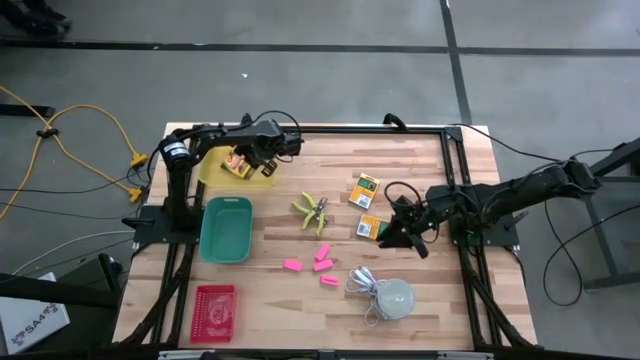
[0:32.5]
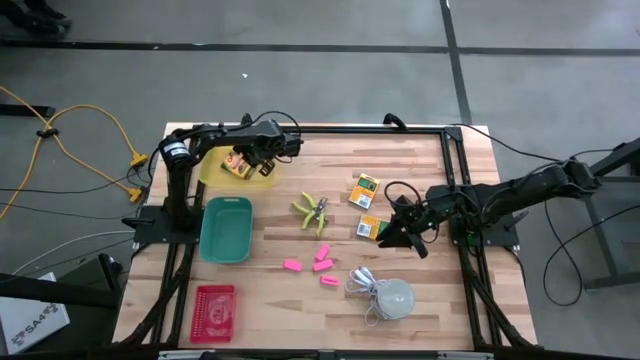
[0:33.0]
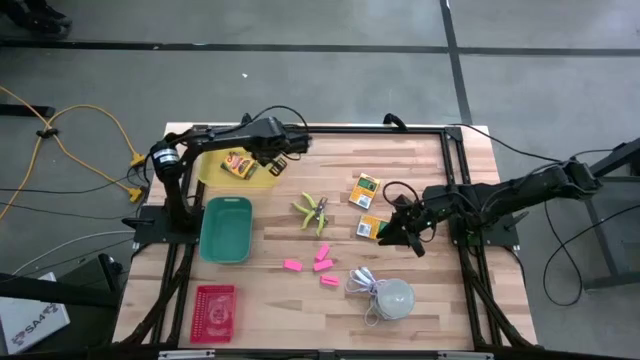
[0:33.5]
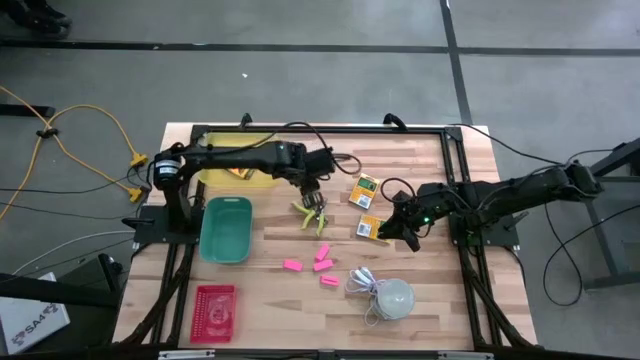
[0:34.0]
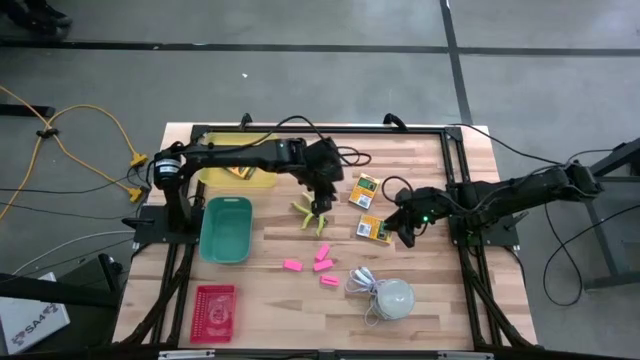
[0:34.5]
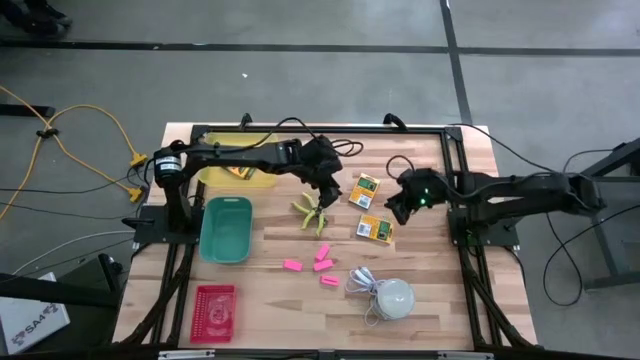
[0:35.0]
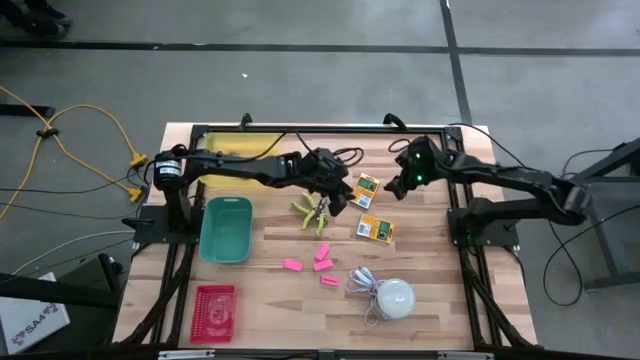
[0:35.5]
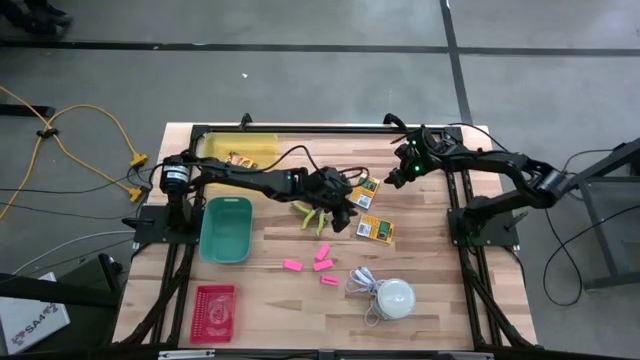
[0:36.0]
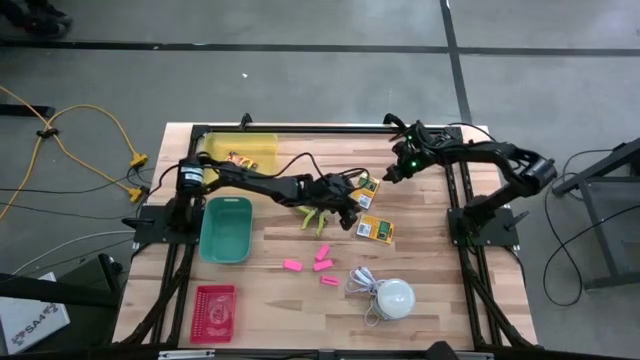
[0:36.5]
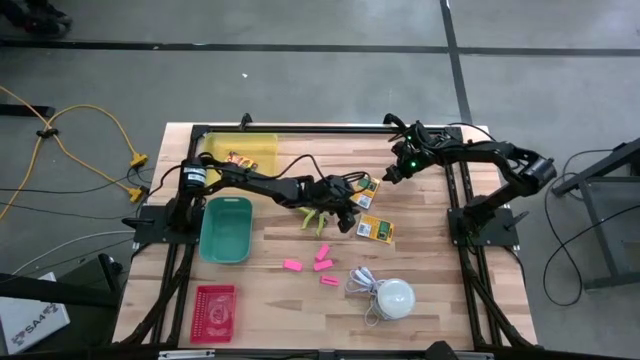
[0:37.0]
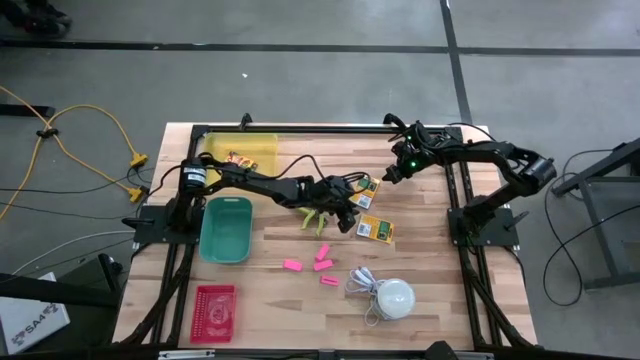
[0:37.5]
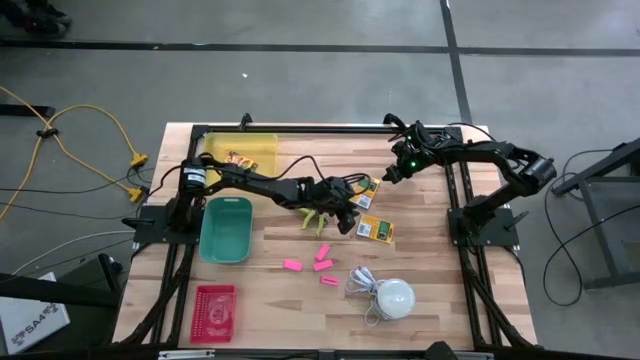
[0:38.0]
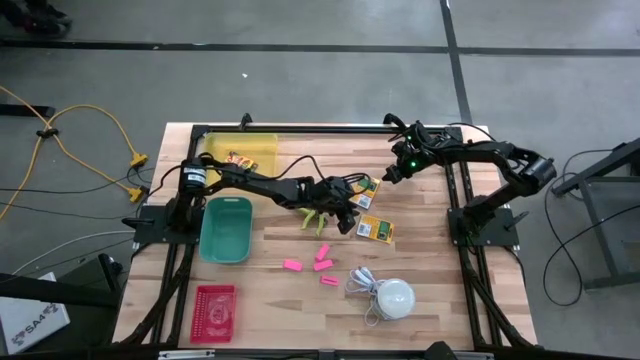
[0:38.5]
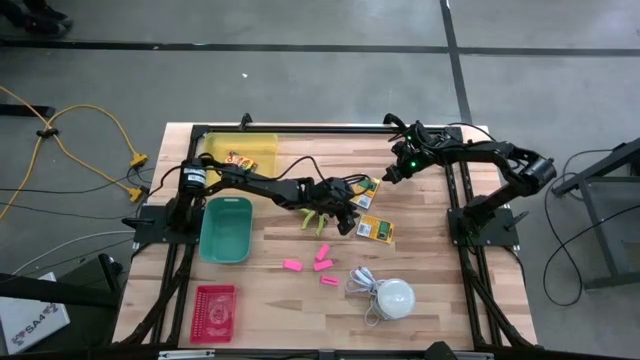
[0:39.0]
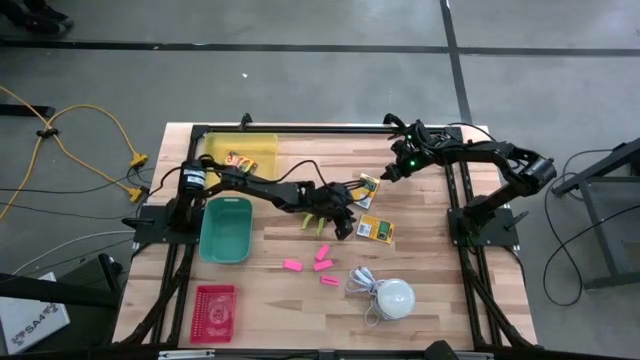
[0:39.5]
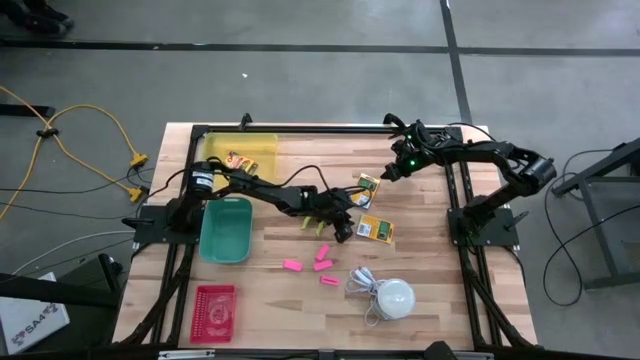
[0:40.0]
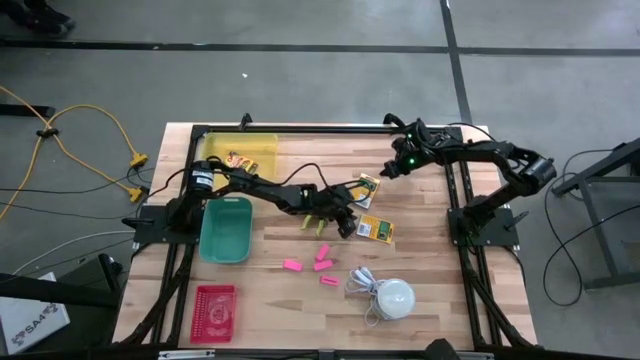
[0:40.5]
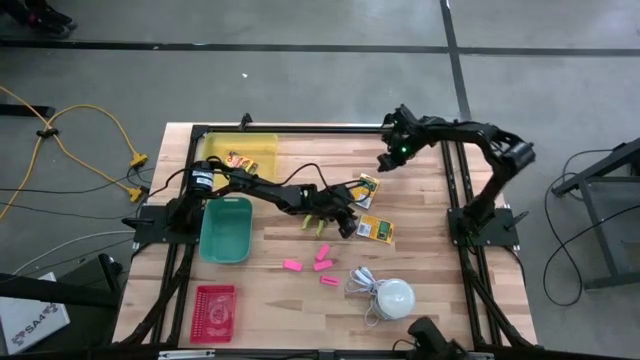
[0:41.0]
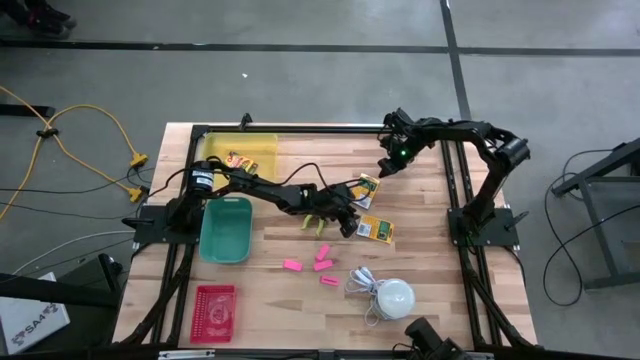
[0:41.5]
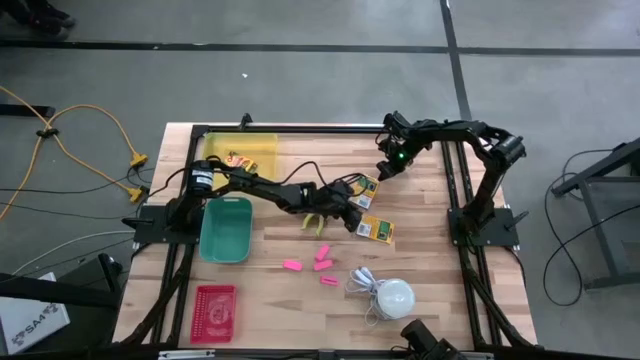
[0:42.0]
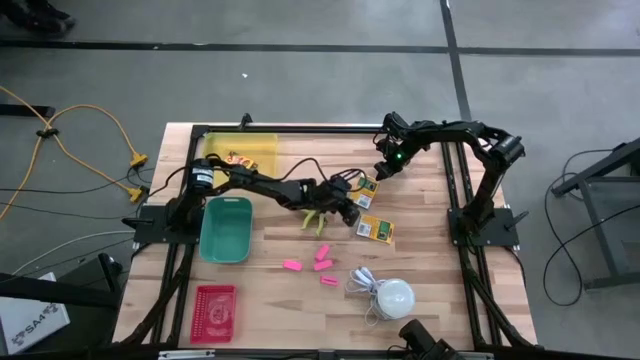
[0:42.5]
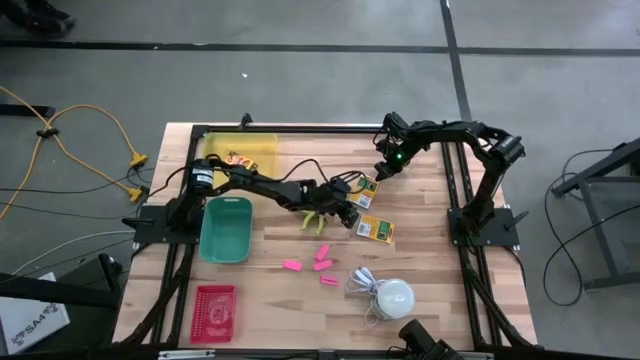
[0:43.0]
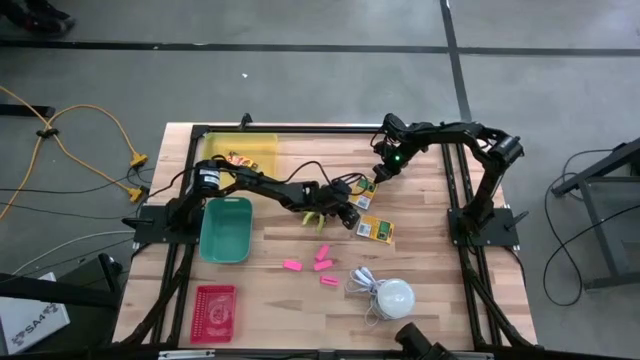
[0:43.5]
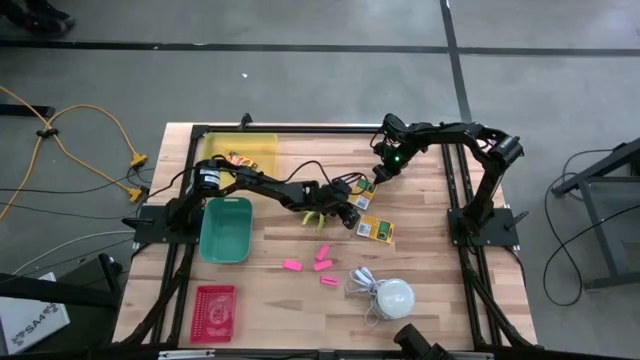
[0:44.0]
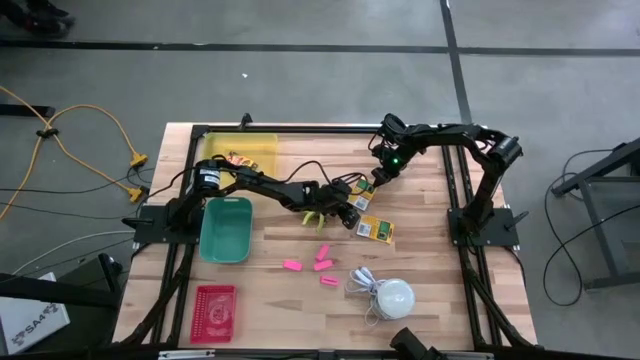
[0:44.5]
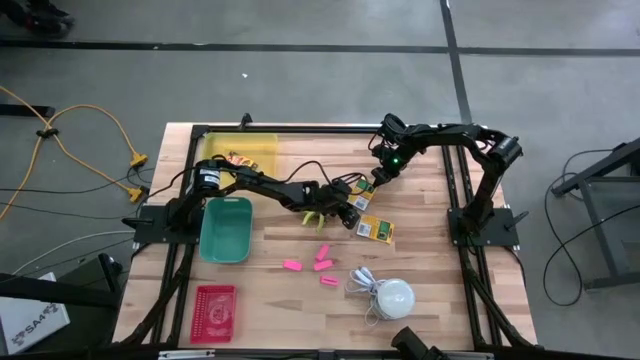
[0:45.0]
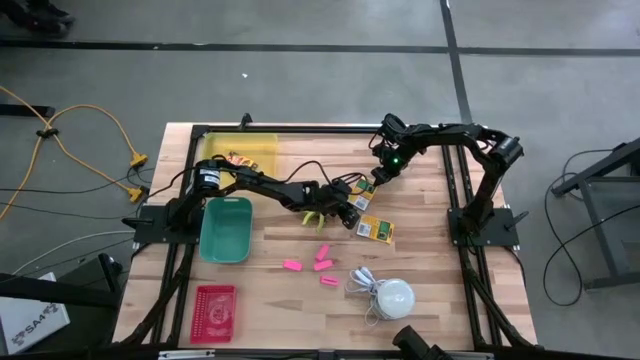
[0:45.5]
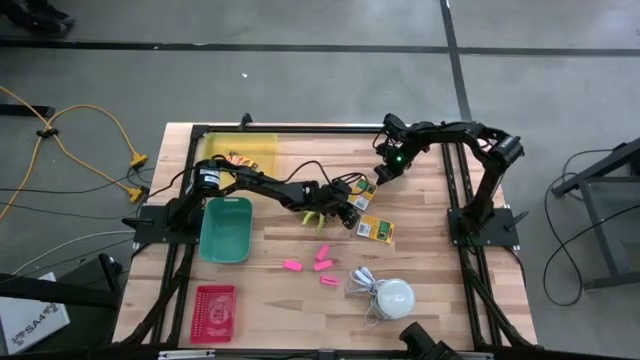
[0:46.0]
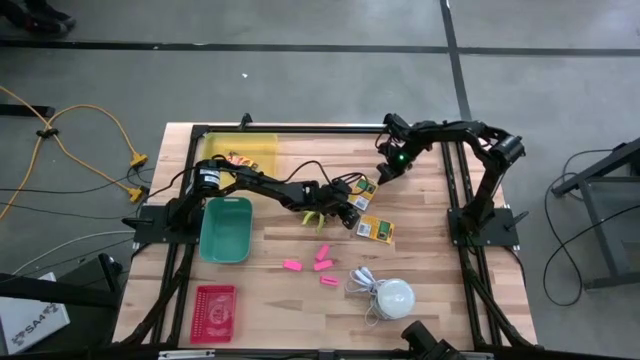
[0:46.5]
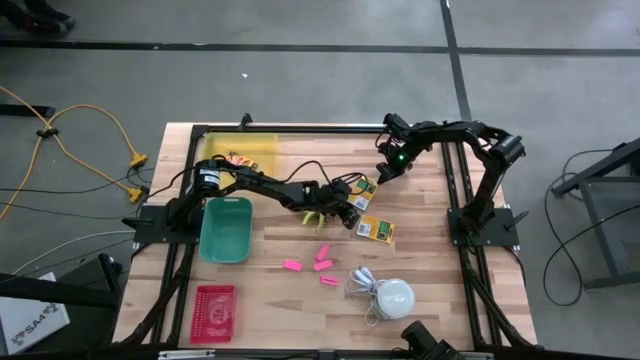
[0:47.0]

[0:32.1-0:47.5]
Task: Pick & Place School Supplies
Put the top yellow crayon box into the yellow bin

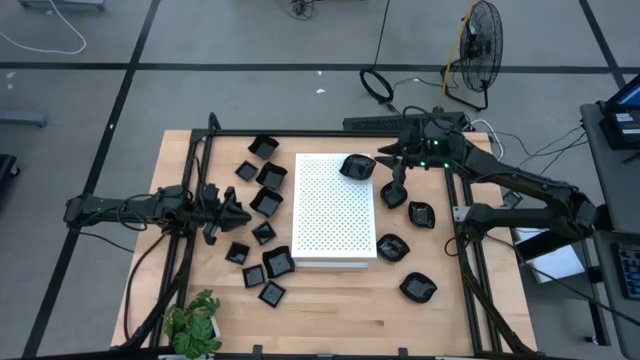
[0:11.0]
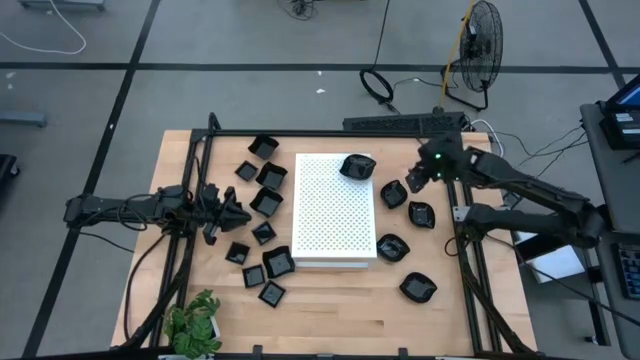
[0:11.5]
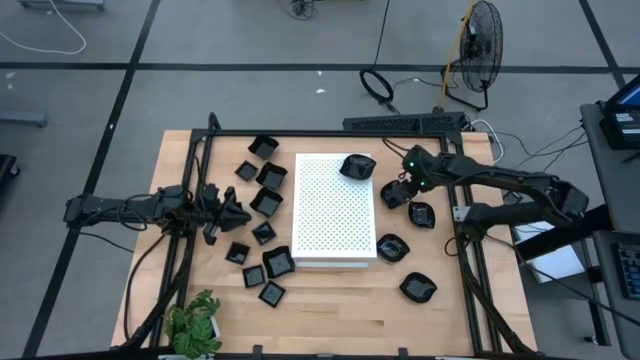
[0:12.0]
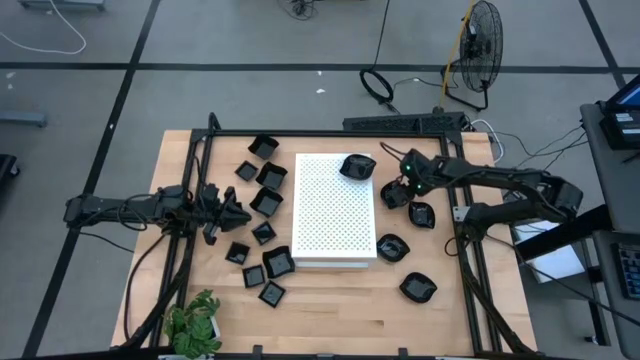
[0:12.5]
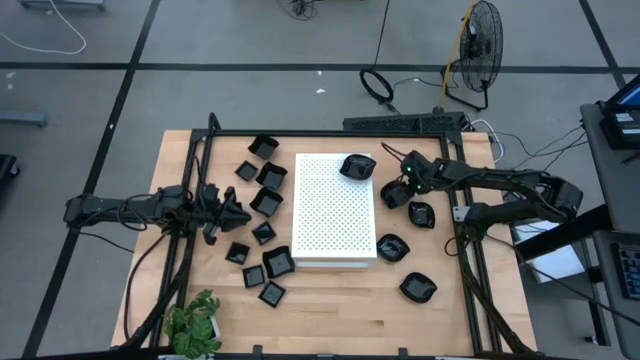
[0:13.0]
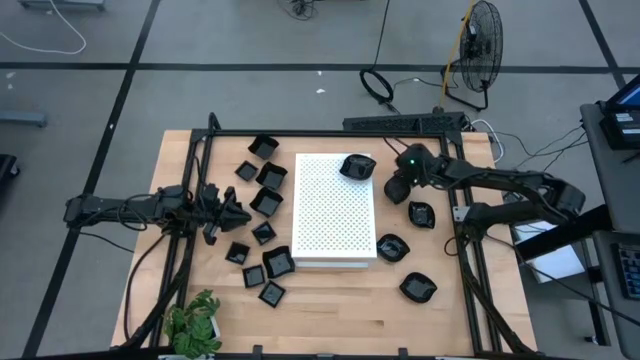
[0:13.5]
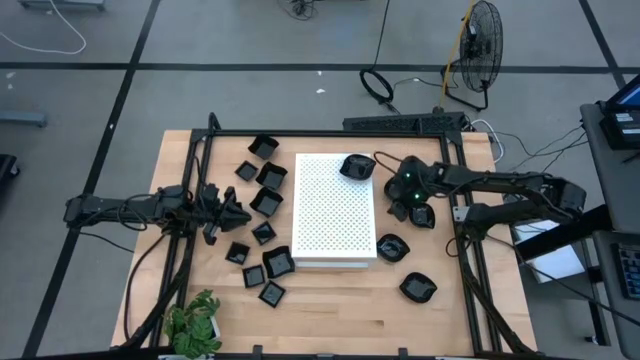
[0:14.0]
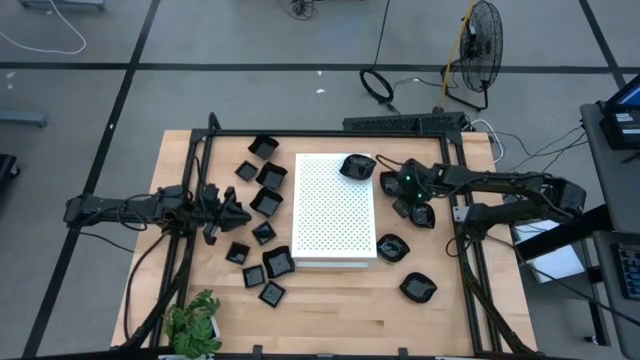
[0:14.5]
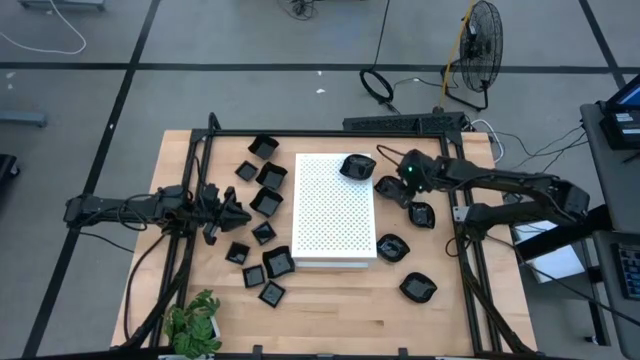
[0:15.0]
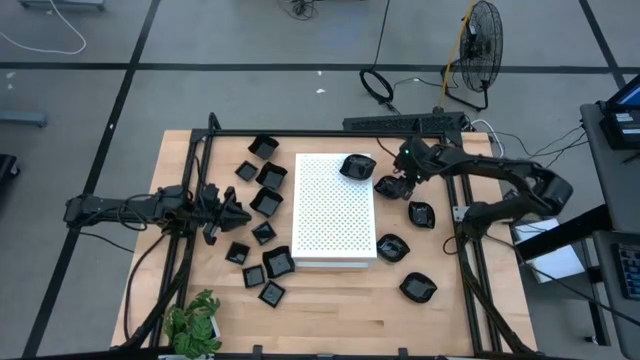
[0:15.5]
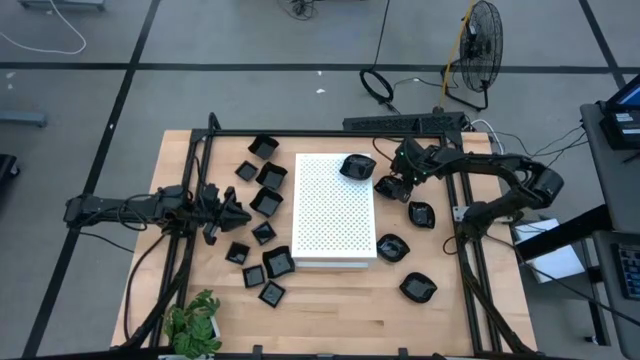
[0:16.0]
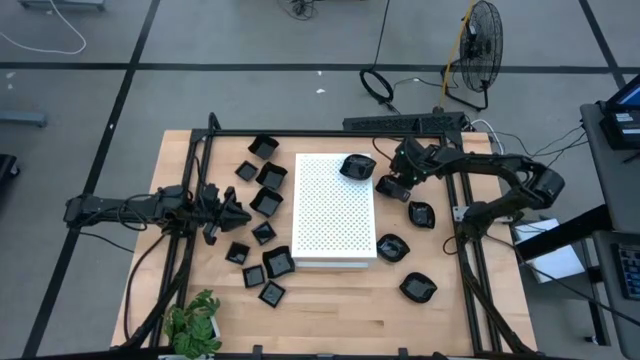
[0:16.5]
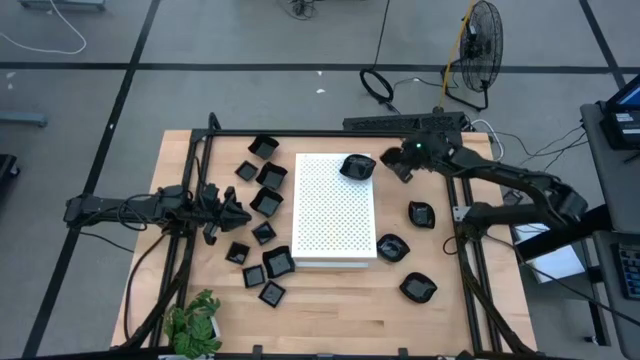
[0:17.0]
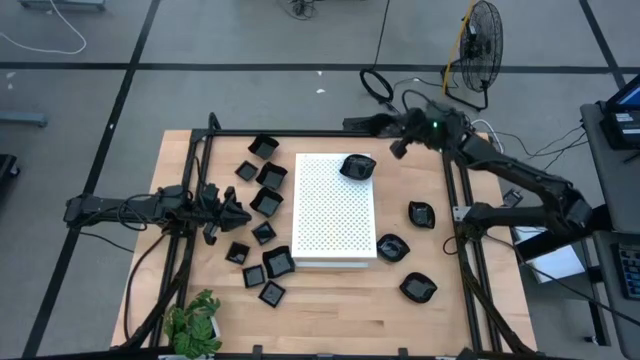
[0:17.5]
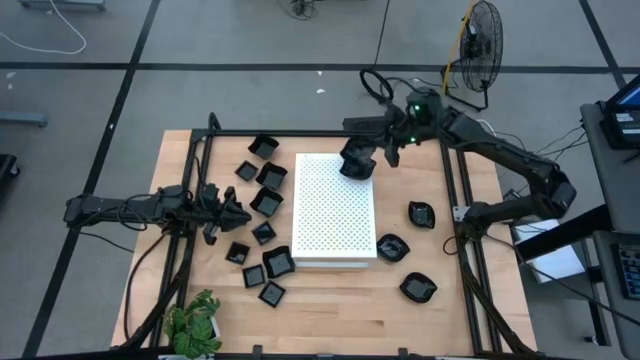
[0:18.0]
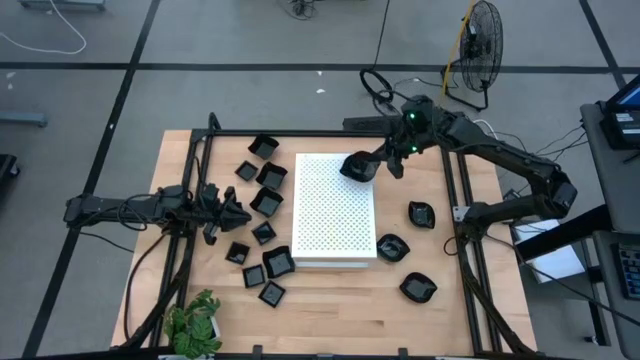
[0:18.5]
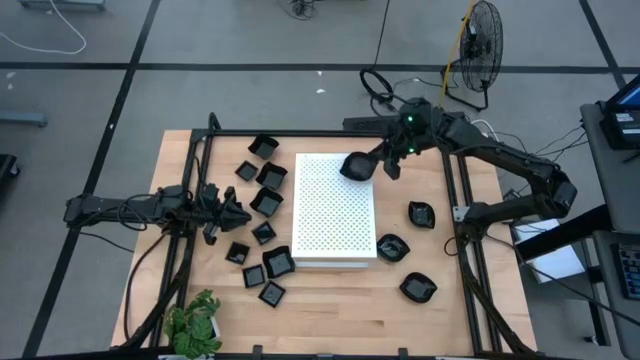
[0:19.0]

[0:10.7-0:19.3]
Task: Pick & Place Mini shaped plates
Stack the black leaf shaped plate on top of the other black leaf shaped plate on the shelf
